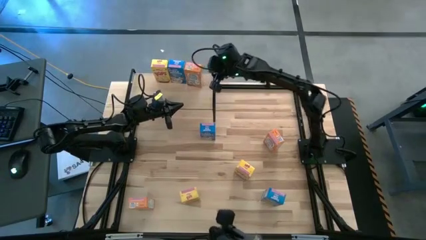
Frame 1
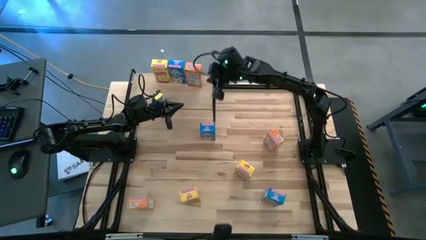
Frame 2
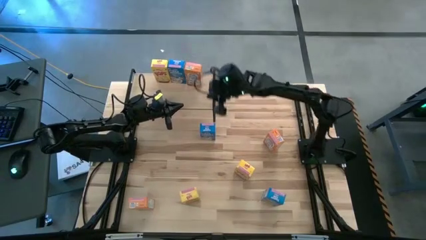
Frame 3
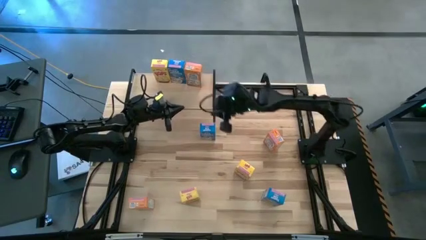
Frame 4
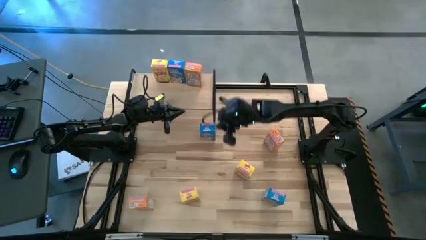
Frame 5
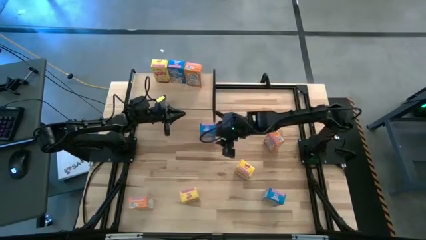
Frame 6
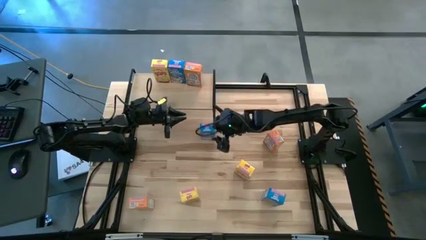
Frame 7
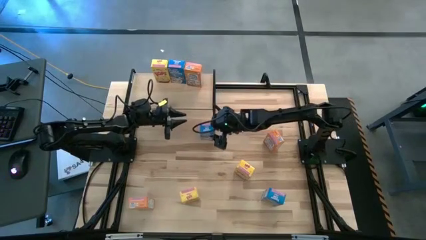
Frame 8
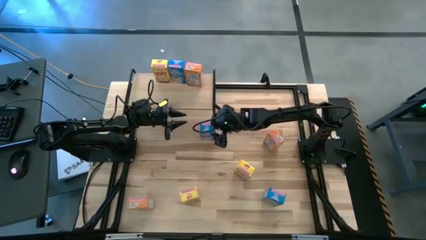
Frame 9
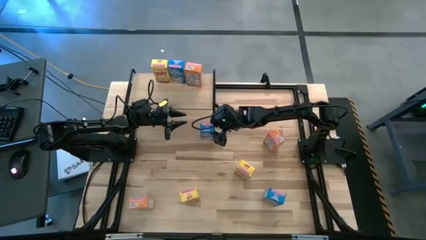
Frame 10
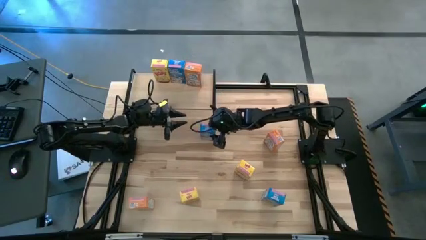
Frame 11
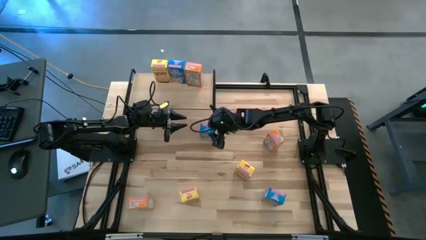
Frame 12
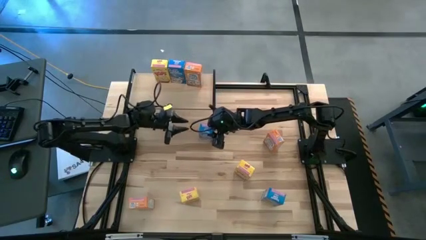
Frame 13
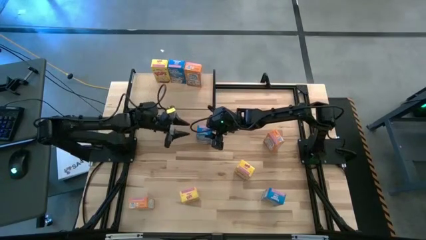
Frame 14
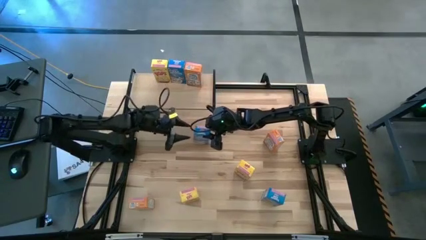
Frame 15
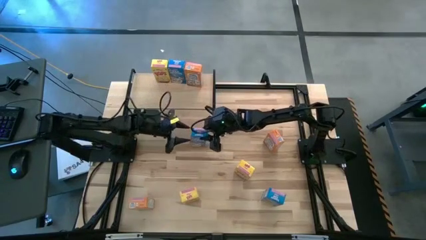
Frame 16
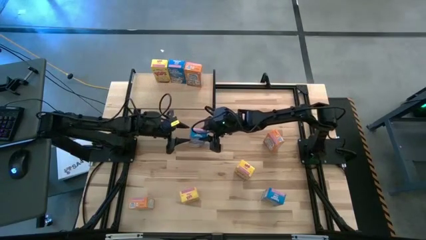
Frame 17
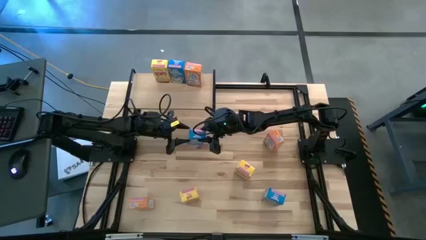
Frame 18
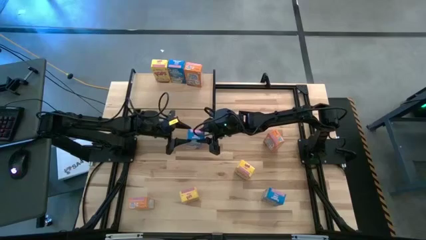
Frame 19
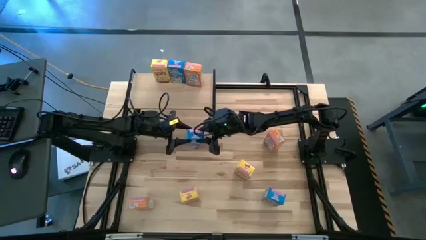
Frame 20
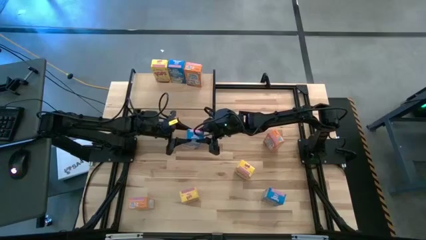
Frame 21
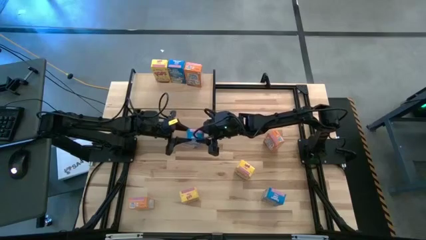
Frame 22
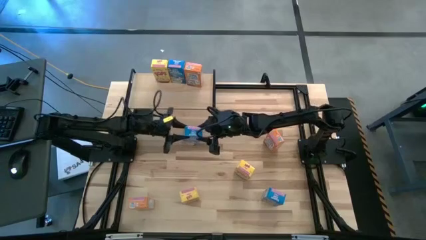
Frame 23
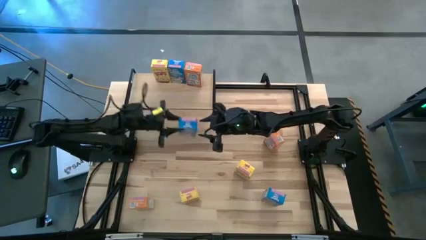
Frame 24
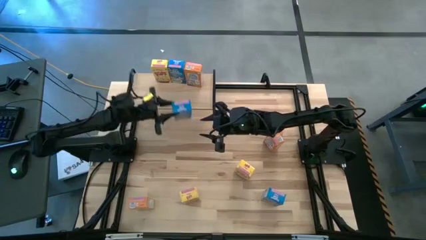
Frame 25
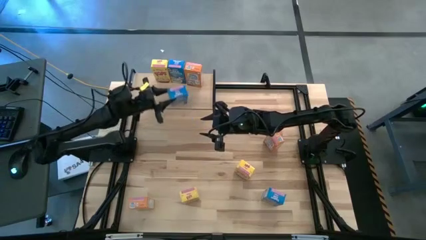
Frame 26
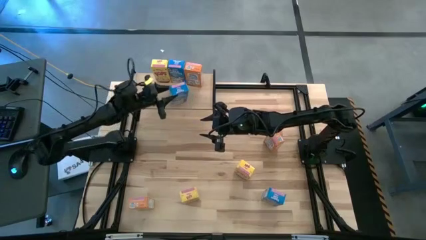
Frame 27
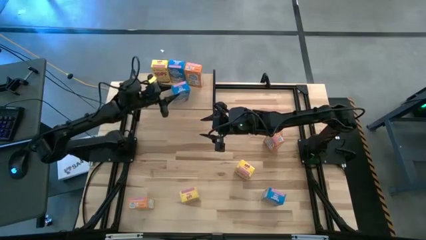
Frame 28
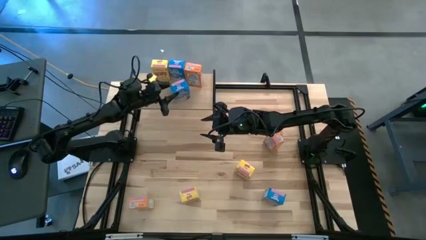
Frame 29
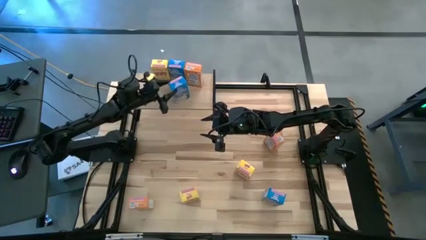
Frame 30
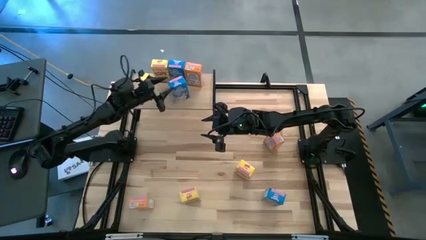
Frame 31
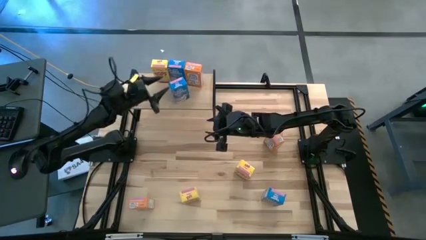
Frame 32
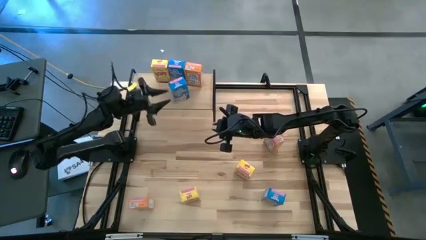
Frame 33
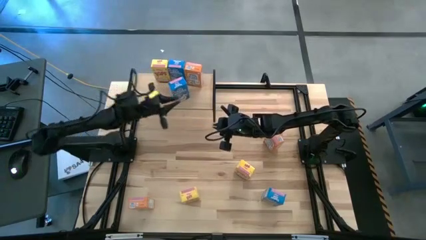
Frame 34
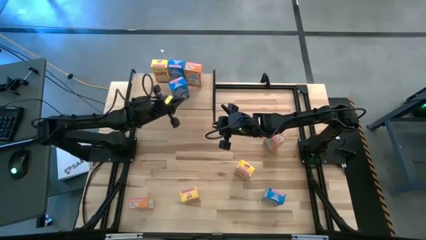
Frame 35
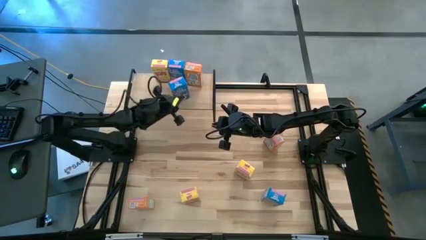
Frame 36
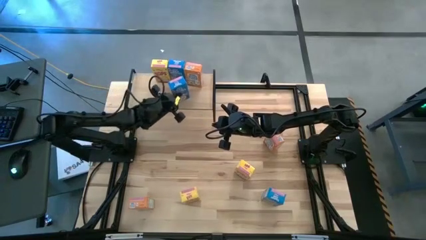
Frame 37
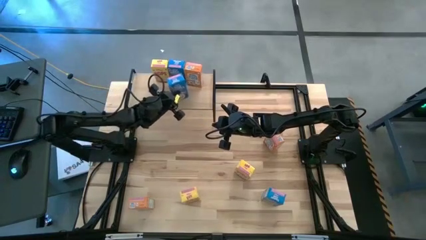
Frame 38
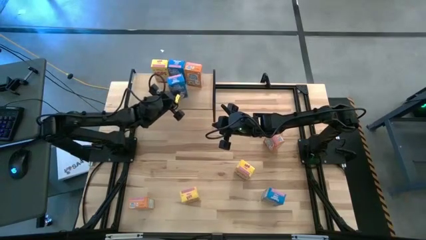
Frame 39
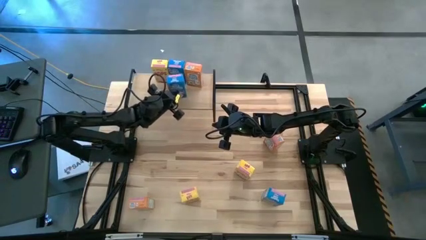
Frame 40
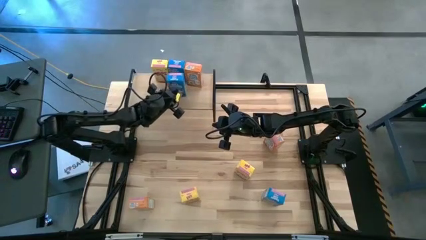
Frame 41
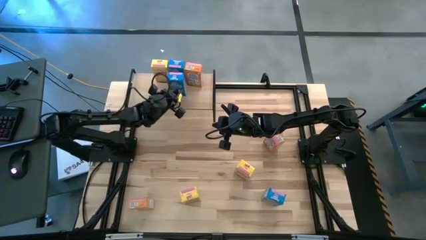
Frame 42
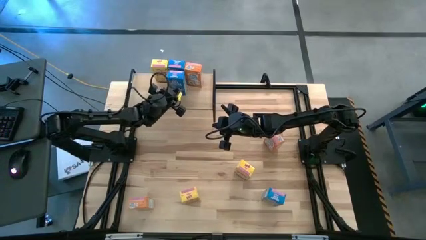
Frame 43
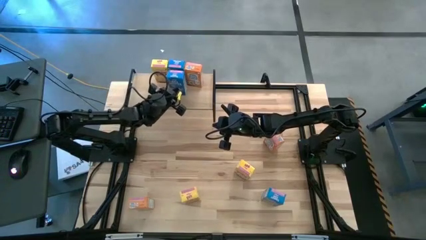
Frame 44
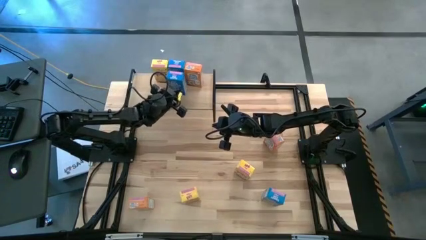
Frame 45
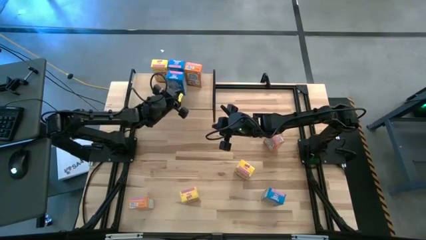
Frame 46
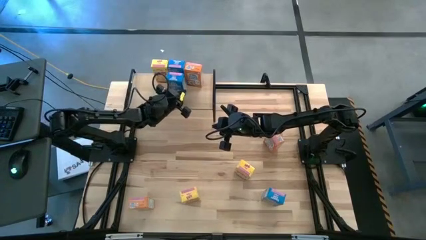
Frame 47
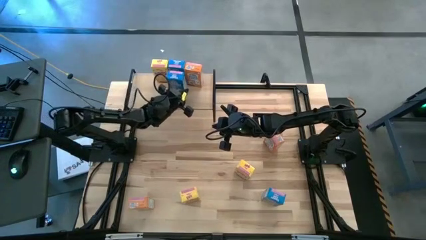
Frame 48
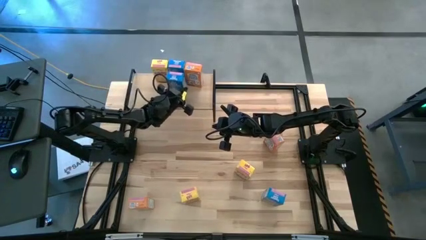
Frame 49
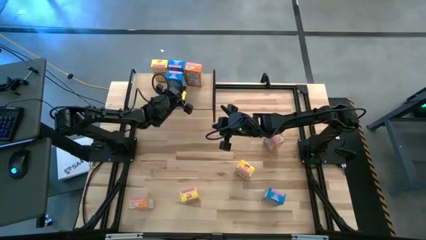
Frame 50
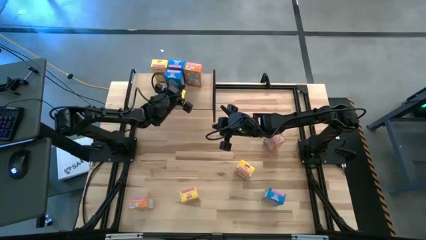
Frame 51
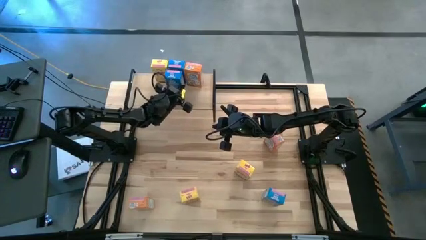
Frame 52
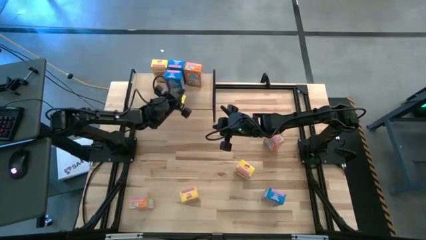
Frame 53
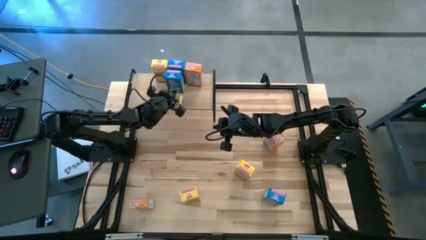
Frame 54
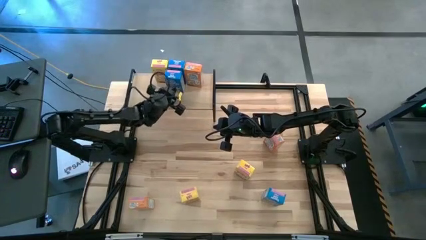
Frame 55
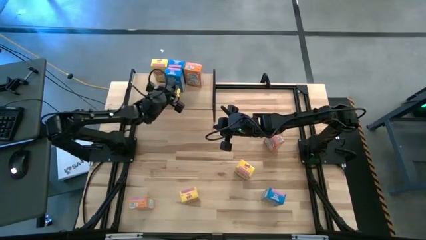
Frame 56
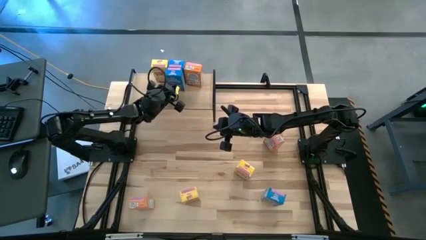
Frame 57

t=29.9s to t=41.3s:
Task: Stack cereal on shelf
Put the top blue cereal box on the shelf aligned with the other blue cereal box

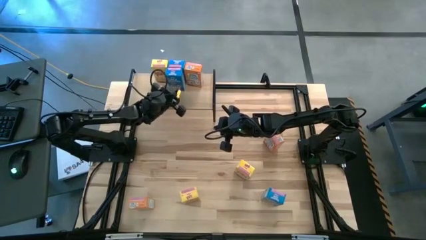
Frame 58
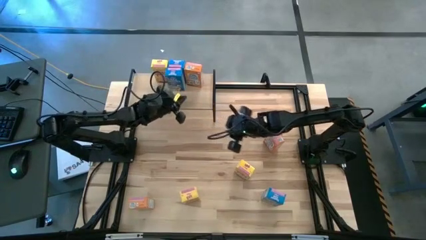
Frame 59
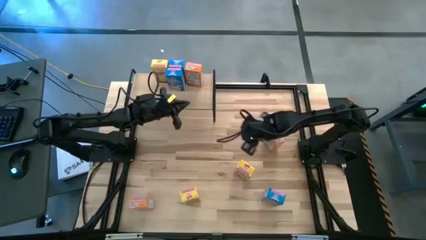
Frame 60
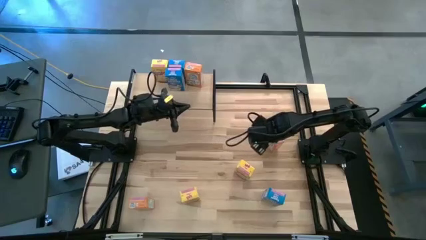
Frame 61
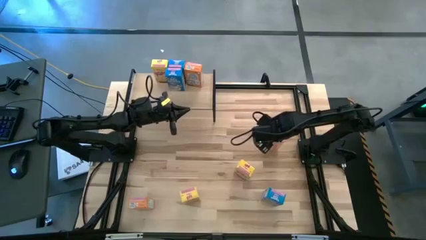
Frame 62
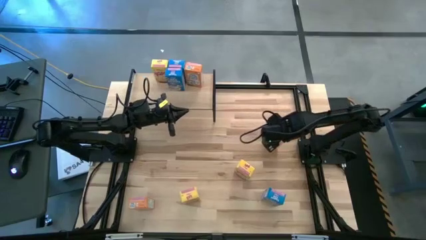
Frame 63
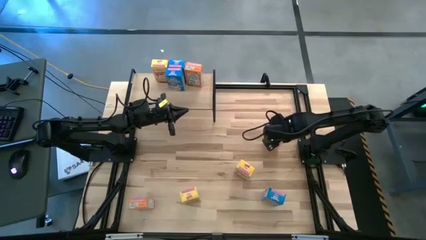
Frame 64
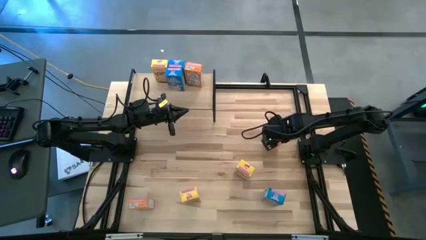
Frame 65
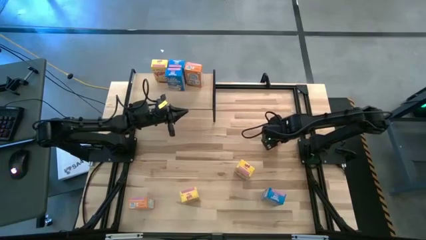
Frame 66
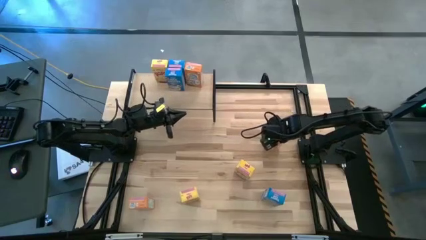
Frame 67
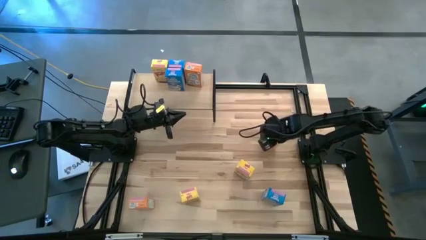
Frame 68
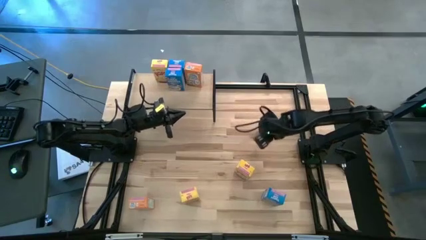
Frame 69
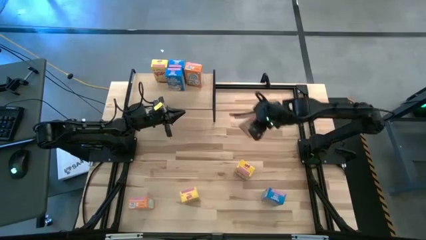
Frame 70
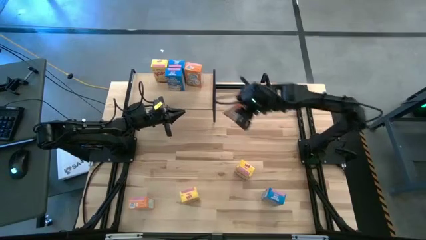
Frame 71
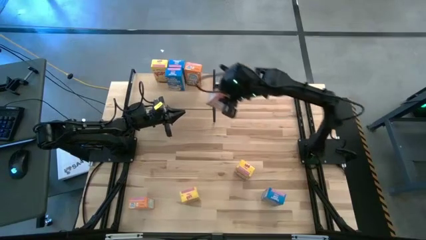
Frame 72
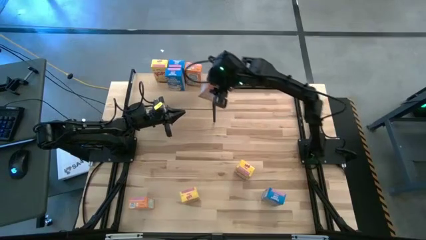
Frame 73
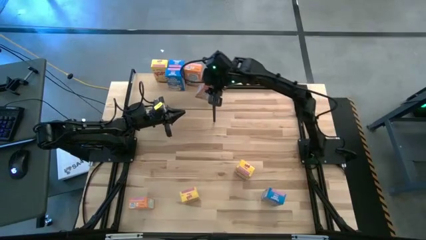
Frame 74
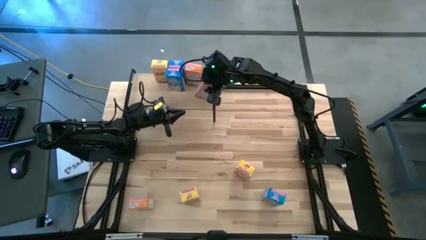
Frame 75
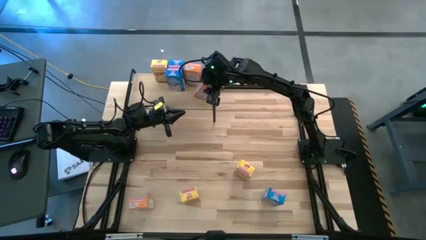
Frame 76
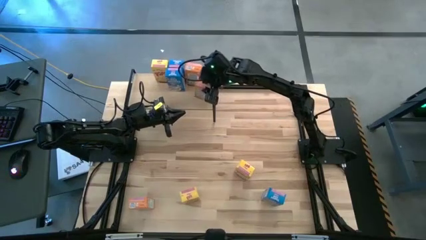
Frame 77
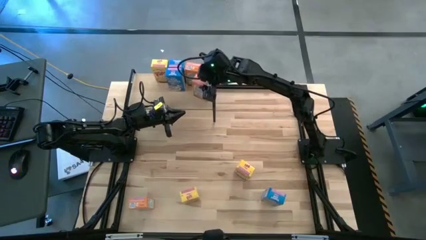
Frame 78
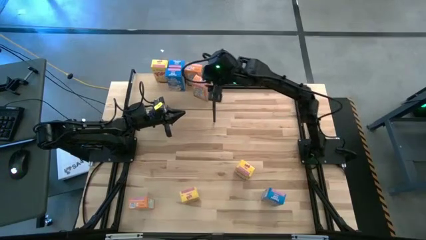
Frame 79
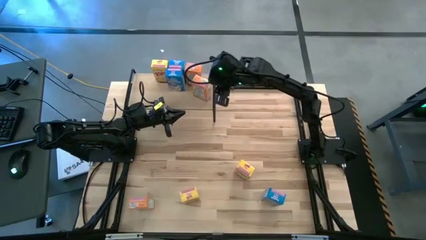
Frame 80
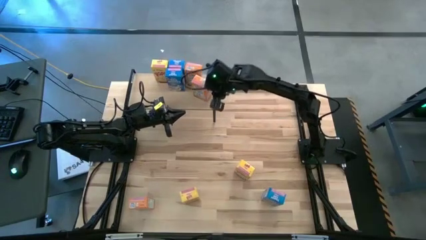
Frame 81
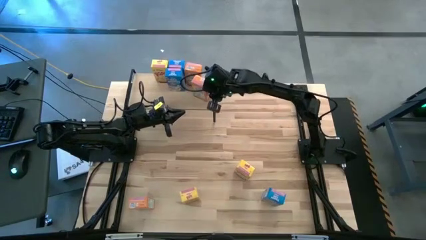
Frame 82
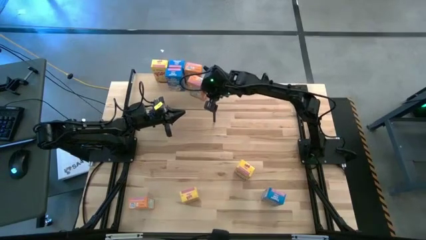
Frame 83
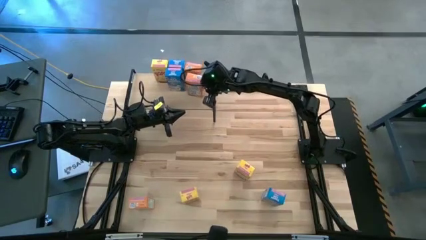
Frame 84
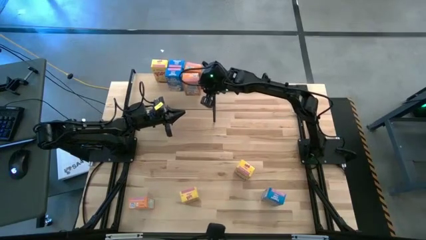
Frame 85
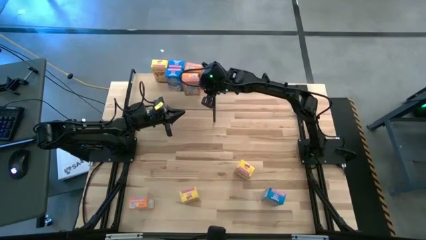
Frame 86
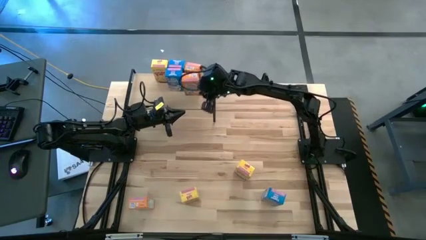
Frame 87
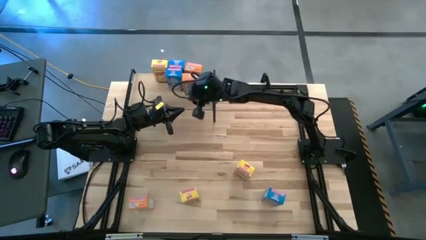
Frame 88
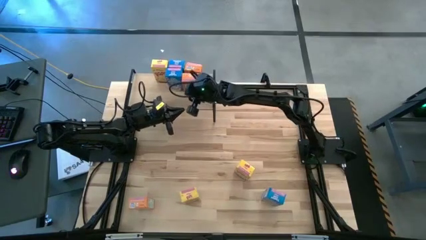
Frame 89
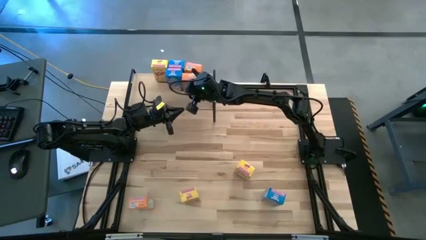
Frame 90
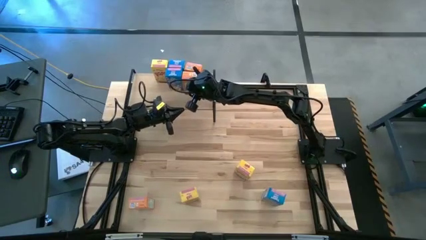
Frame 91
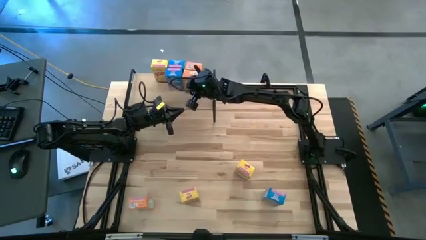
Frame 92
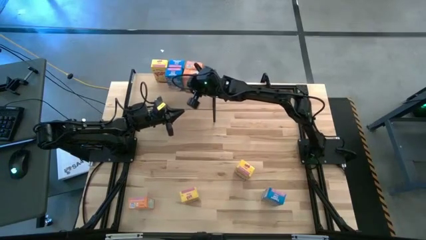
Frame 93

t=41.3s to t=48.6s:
Put the right orange cereal box on the shelf aligned with the other orange box
